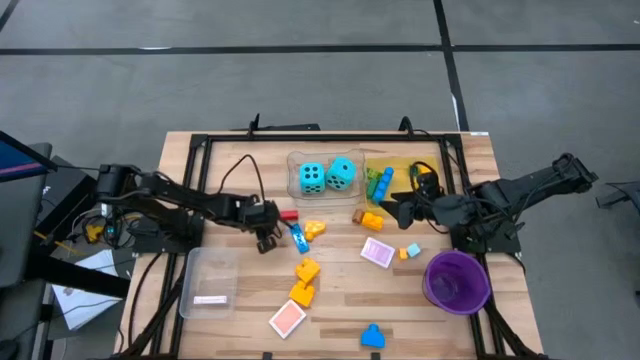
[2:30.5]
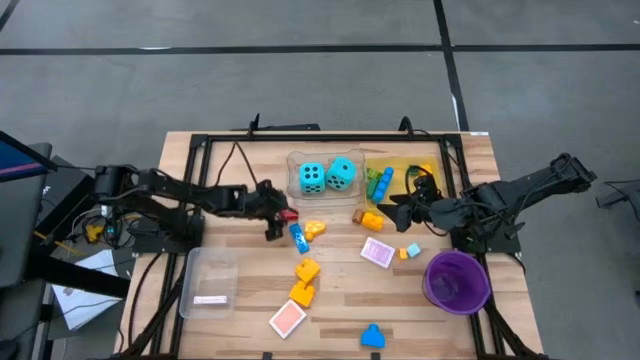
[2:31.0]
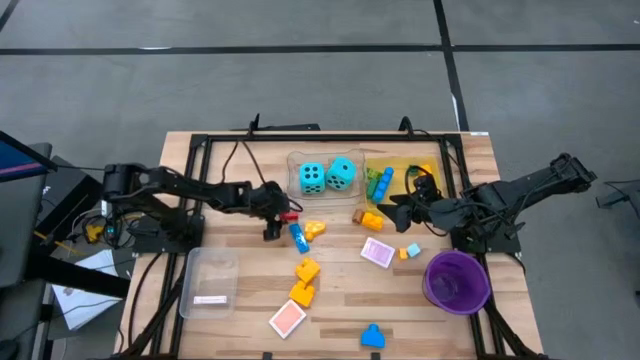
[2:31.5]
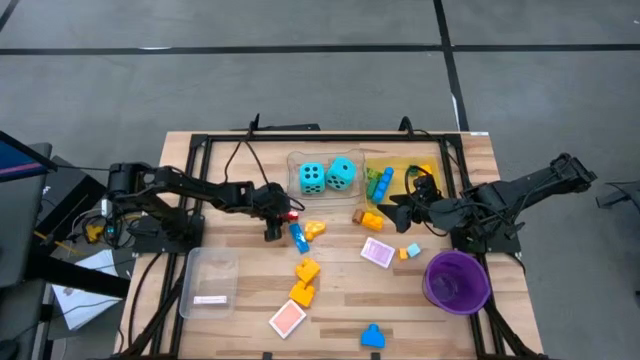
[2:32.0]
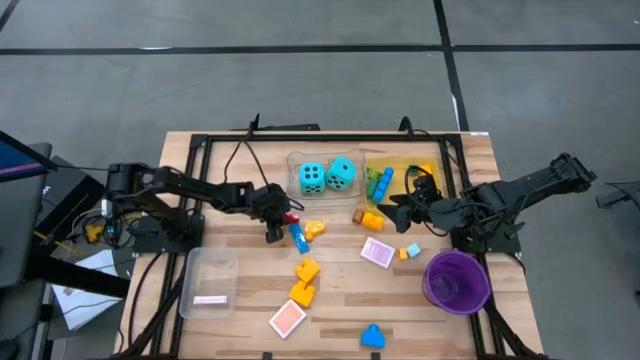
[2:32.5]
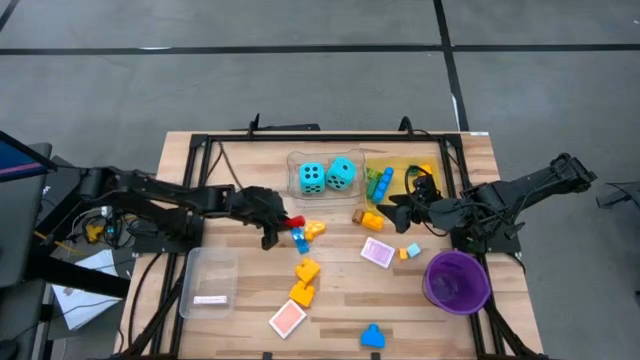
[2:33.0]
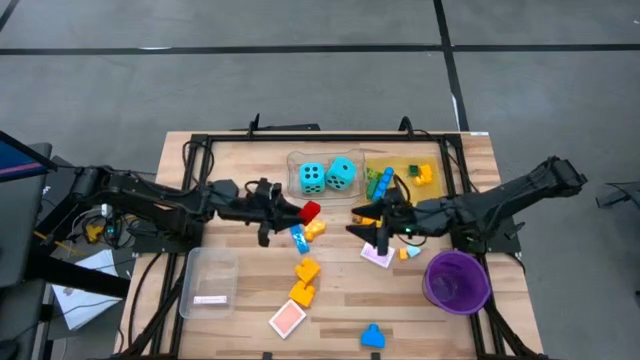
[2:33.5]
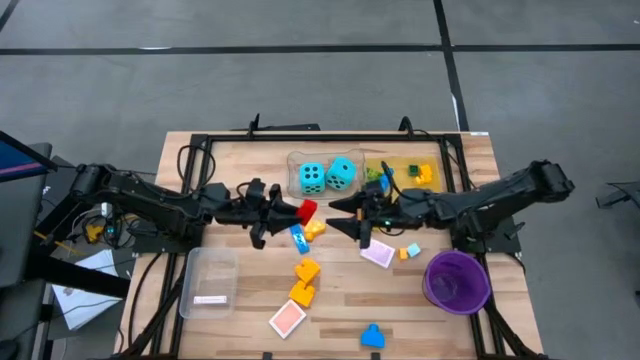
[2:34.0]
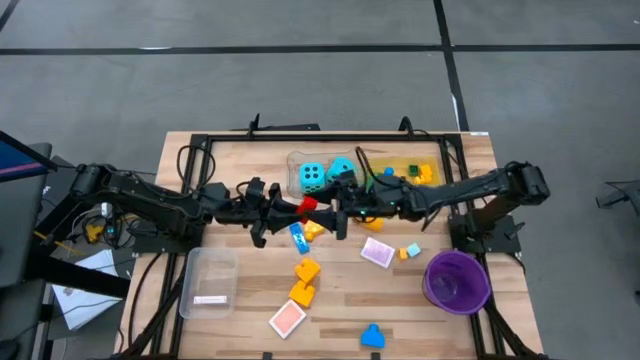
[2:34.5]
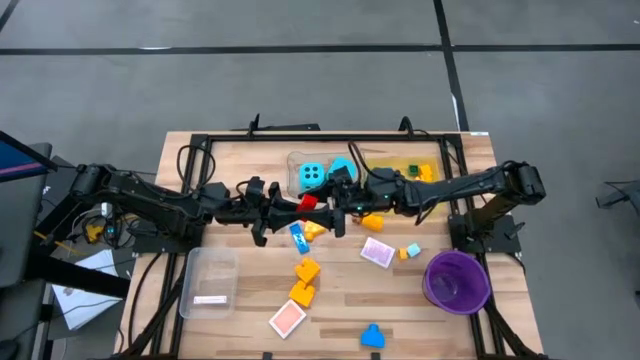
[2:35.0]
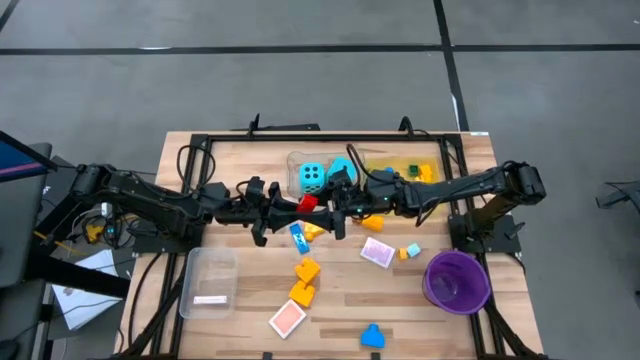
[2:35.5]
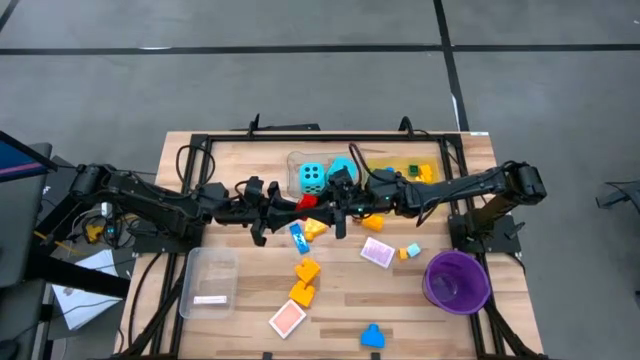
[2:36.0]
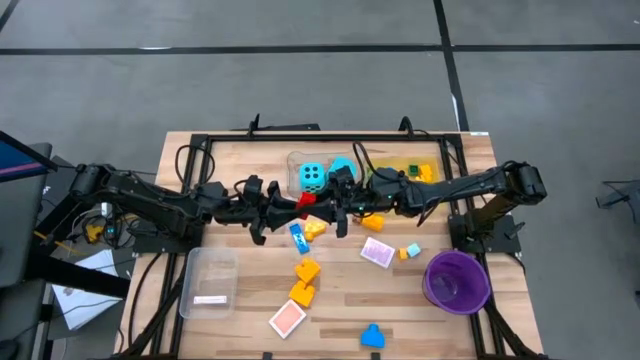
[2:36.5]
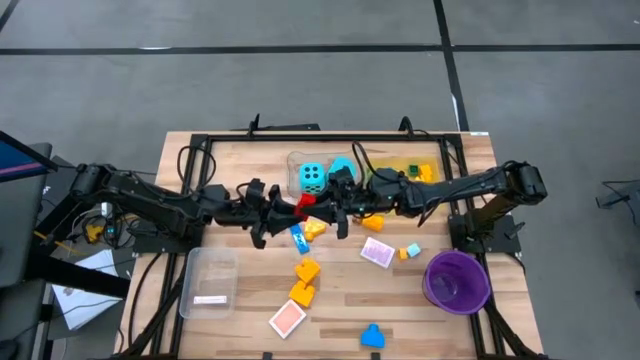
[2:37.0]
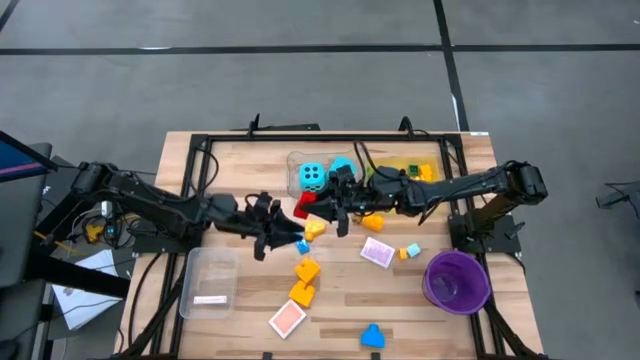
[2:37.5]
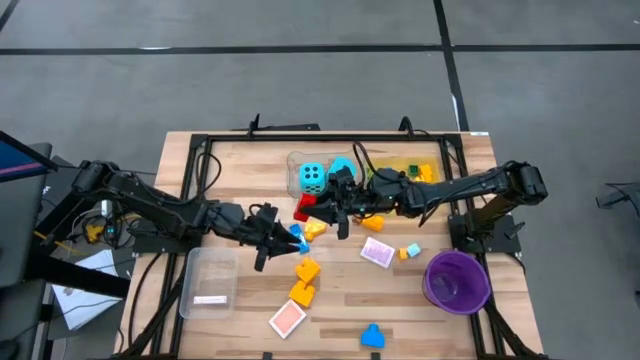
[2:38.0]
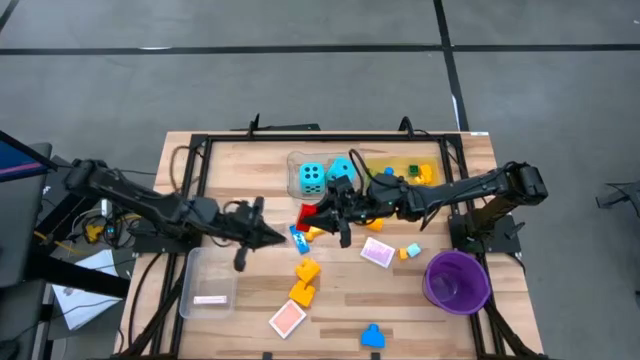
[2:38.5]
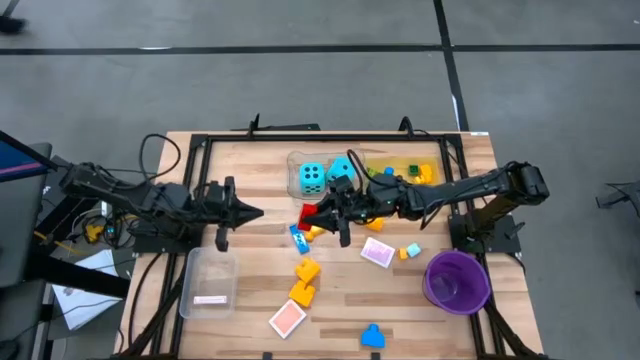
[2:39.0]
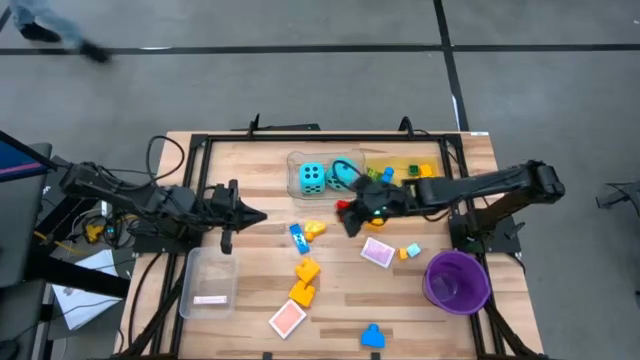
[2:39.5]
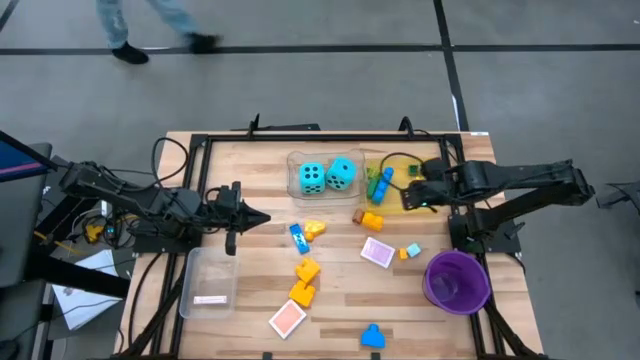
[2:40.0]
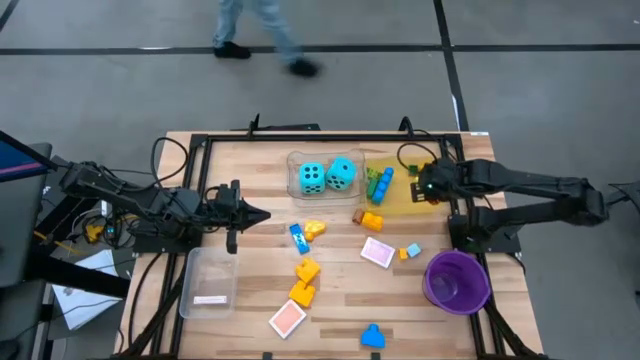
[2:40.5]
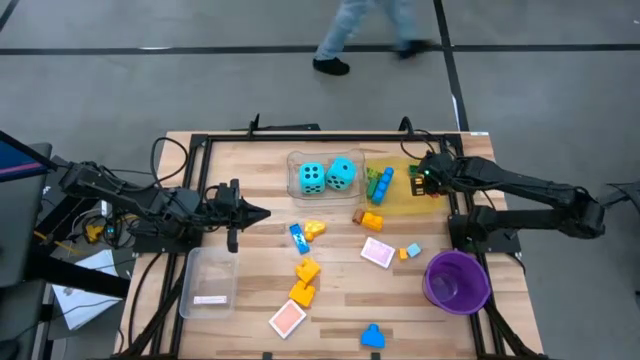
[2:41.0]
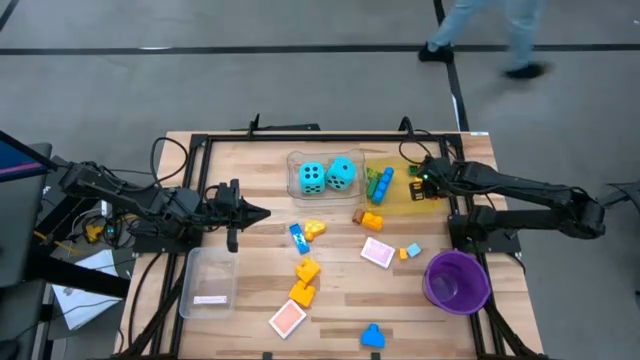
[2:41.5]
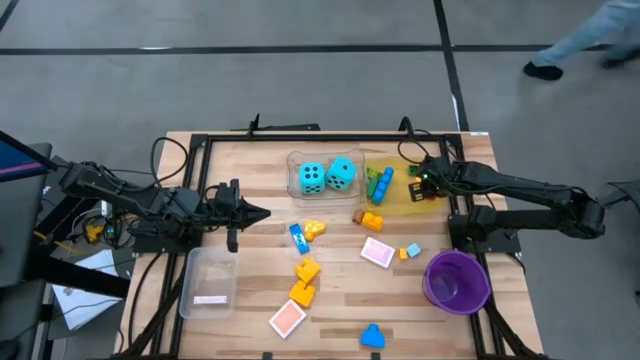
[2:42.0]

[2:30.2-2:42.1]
Task: Pick & Place Toys
Put the red game piece into the yellow bin

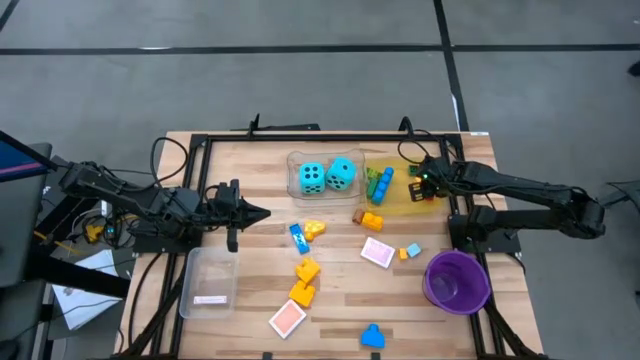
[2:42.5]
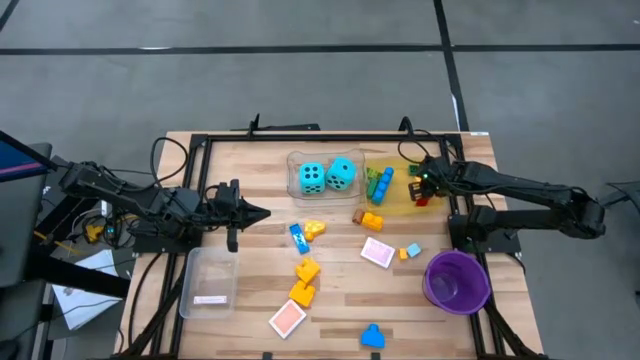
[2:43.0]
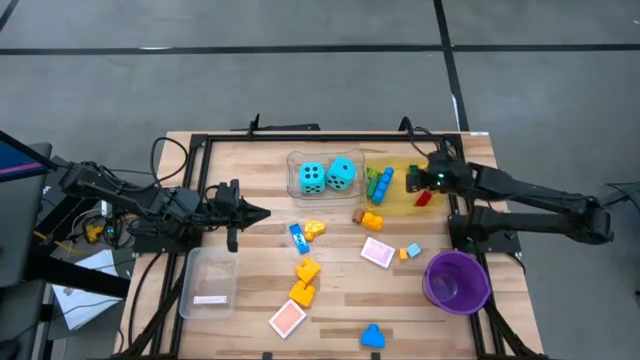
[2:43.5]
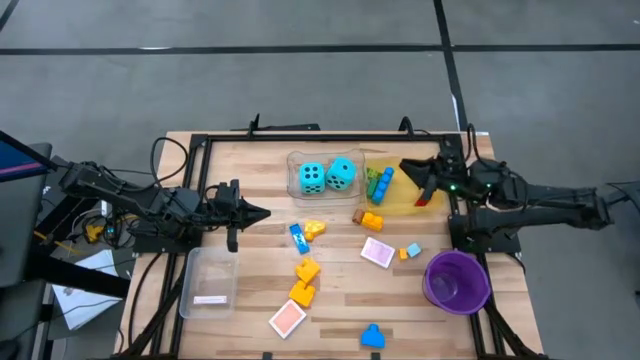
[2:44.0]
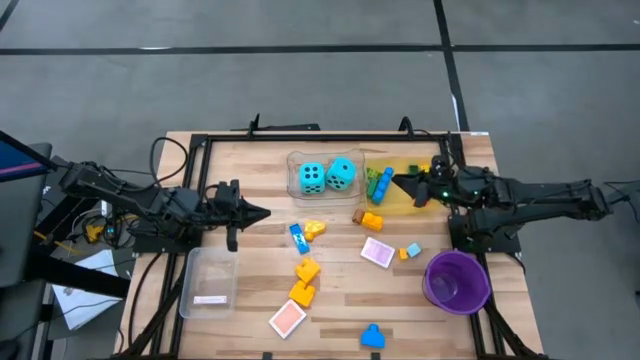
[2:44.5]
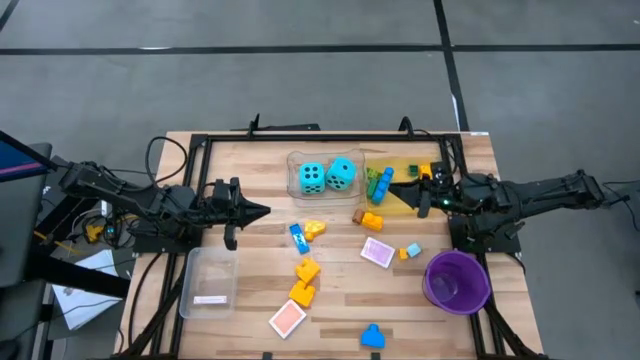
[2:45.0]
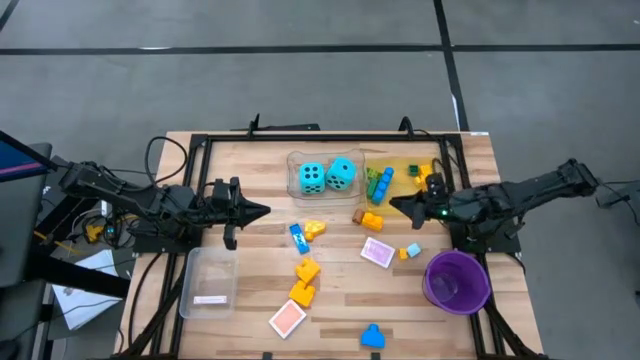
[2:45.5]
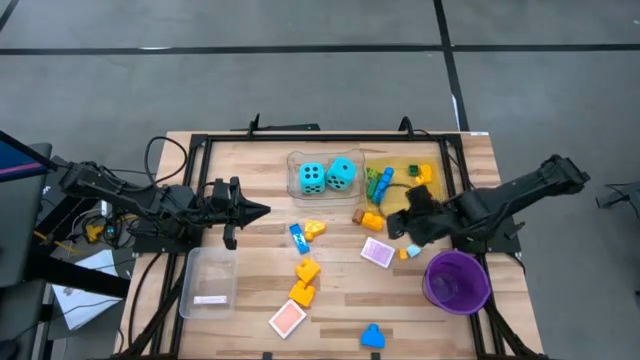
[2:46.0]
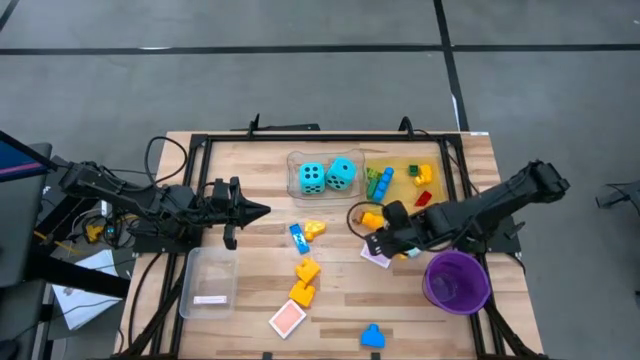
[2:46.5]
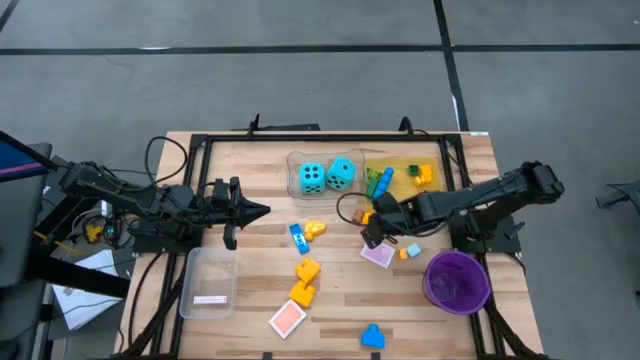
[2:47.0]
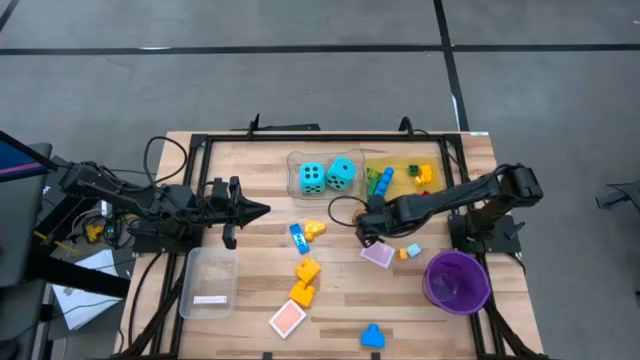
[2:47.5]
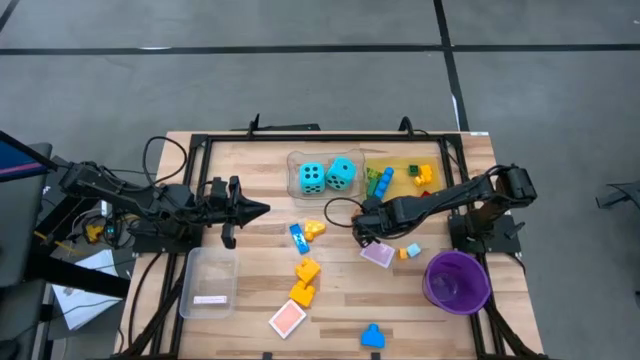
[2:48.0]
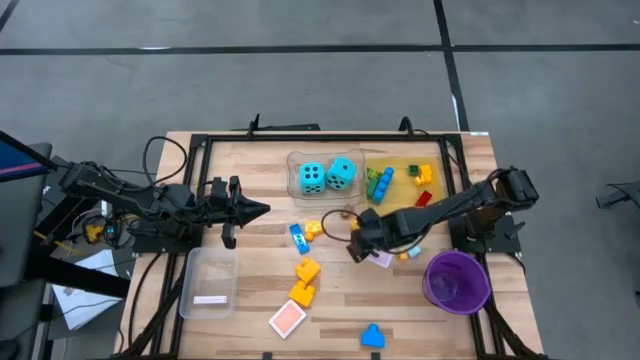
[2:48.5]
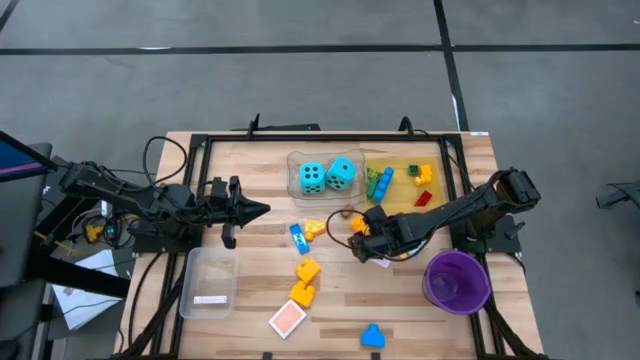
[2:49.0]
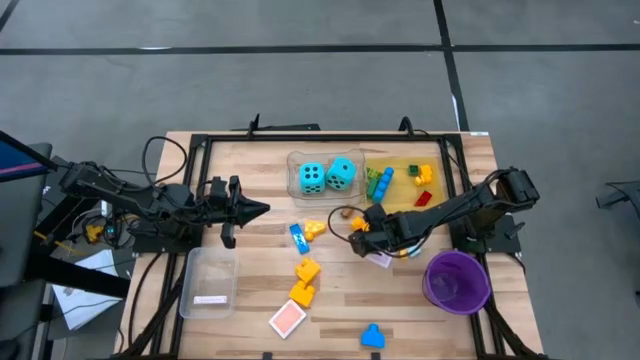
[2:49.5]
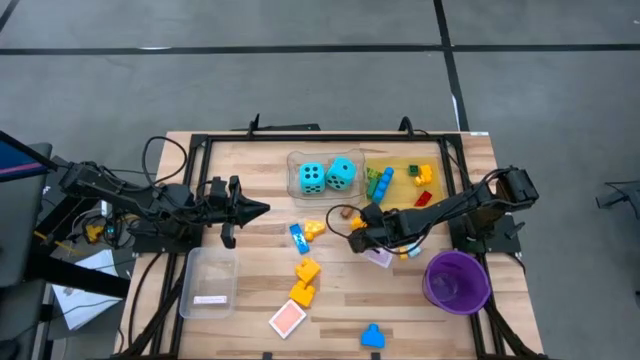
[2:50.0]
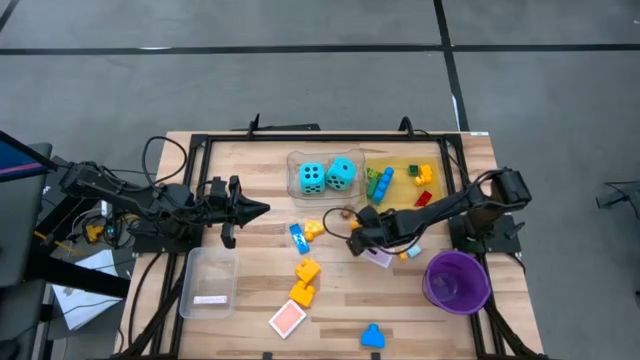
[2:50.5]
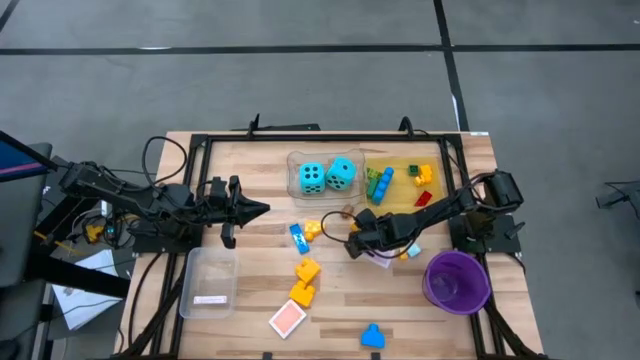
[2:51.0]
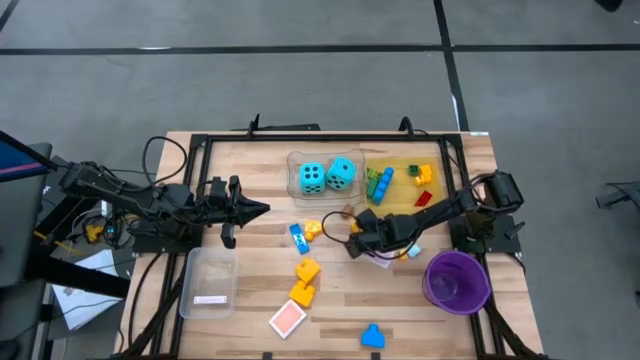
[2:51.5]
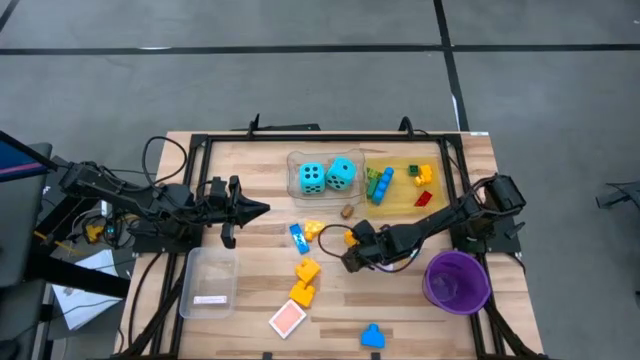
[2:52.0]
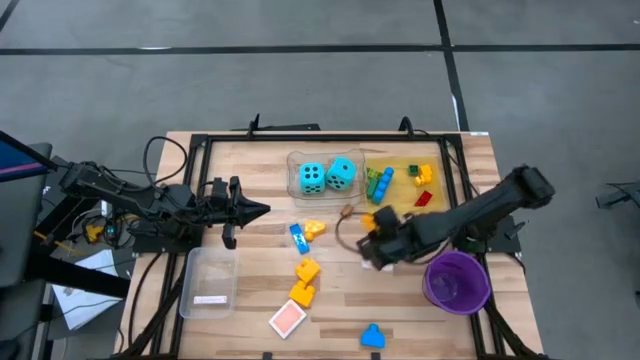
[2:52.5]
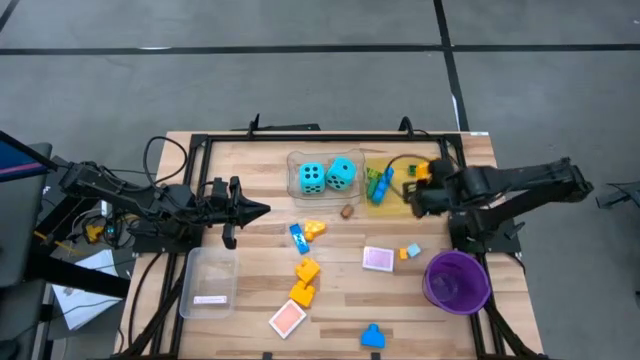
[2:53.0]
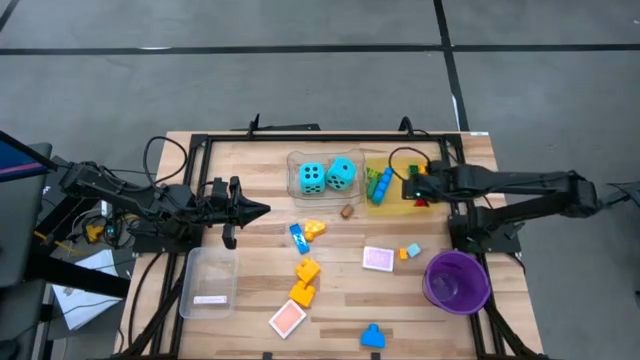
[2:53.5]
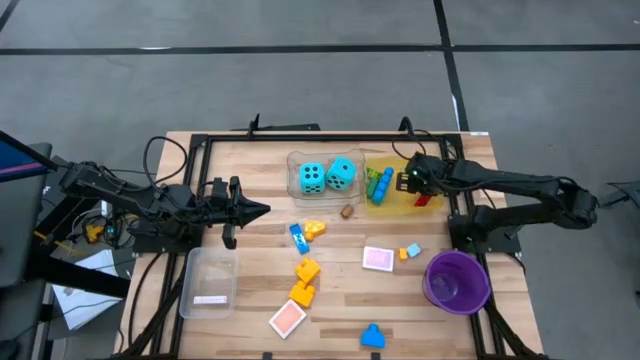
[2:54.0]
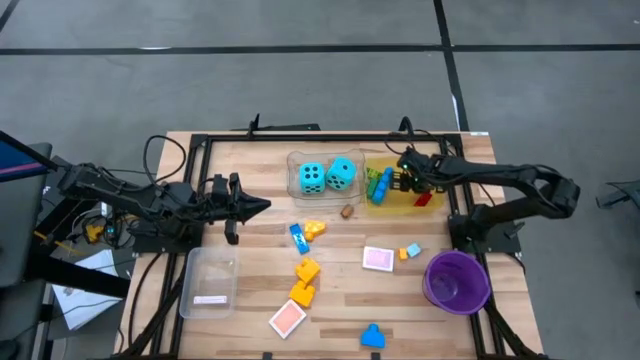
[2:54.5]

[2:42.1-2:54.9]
Put the yellow game piece into the yellow bin
